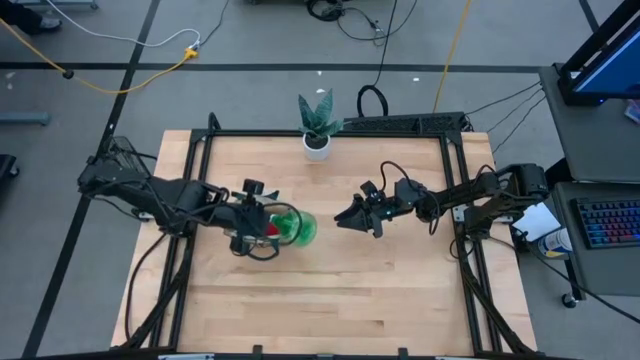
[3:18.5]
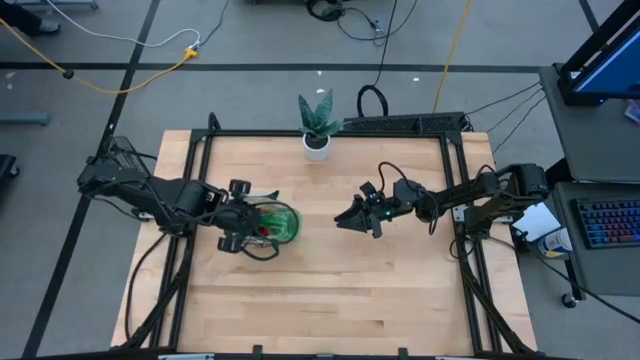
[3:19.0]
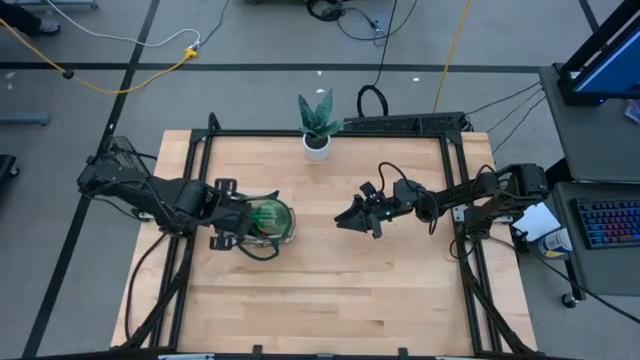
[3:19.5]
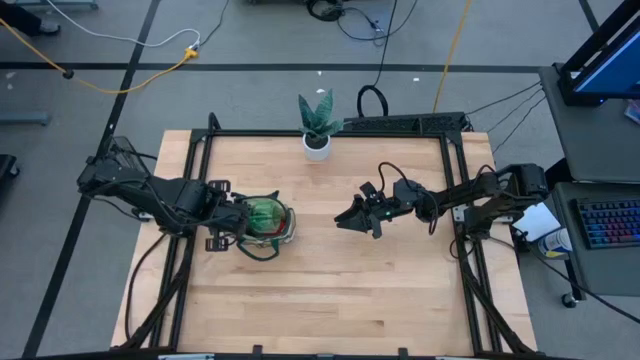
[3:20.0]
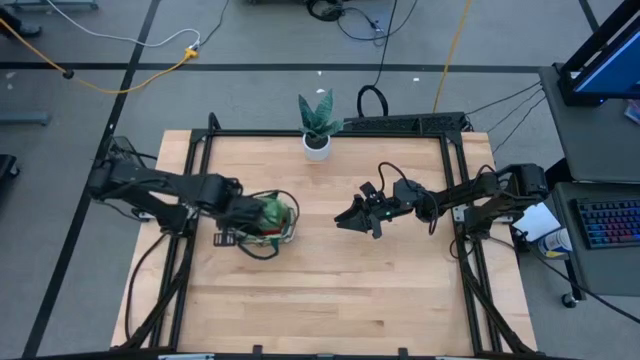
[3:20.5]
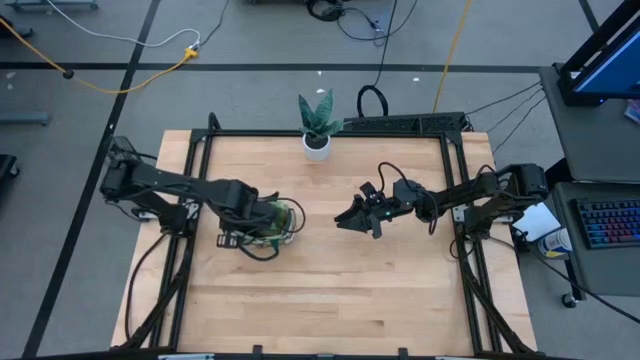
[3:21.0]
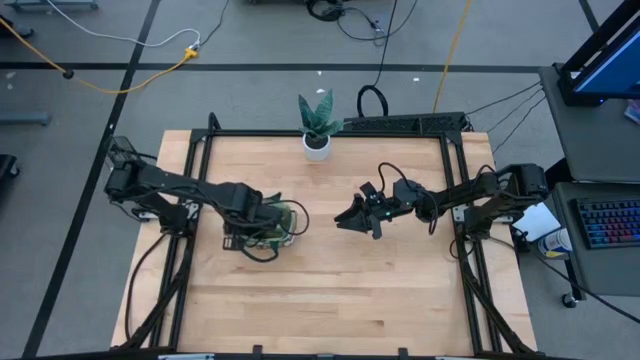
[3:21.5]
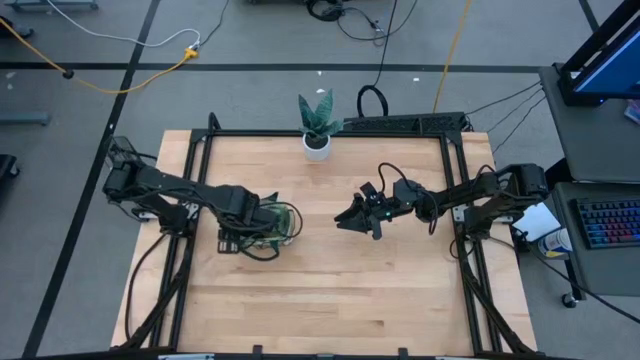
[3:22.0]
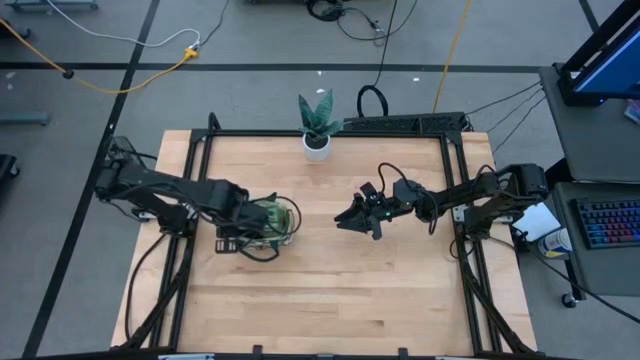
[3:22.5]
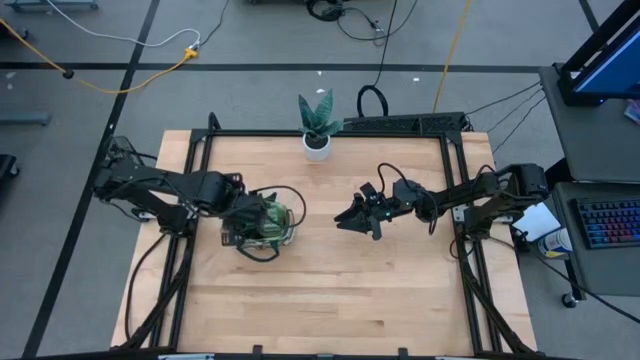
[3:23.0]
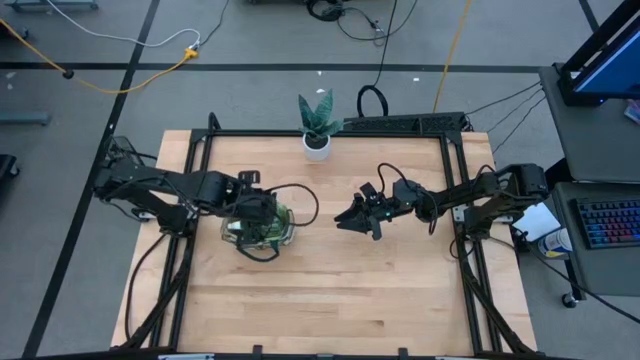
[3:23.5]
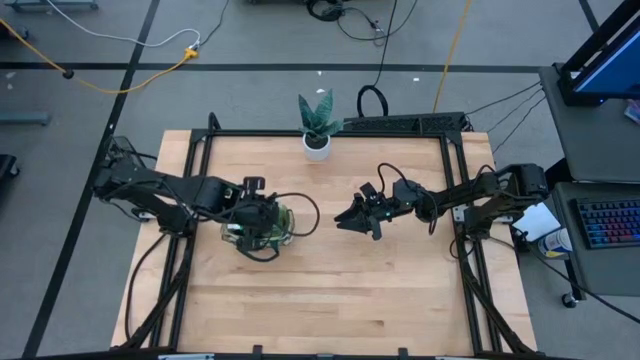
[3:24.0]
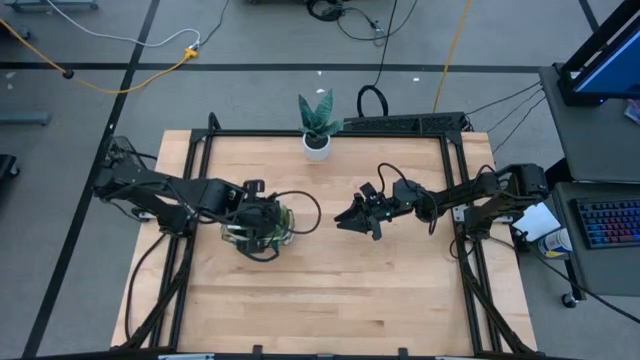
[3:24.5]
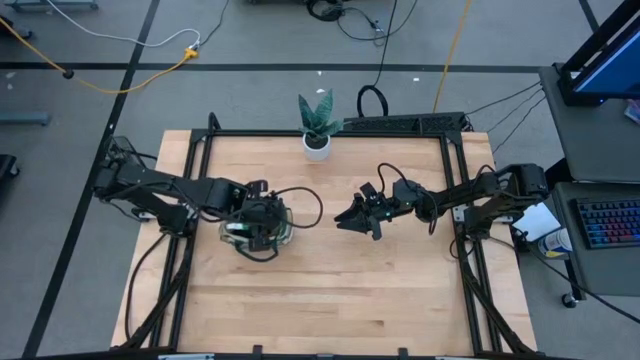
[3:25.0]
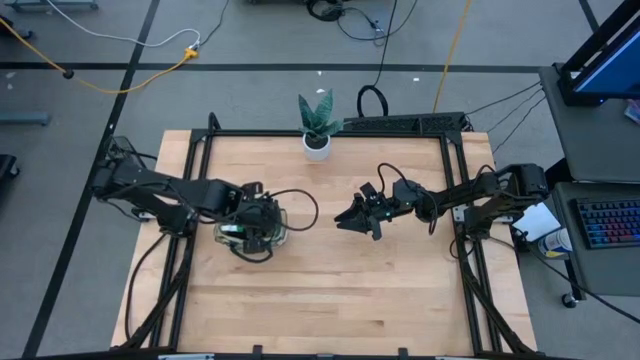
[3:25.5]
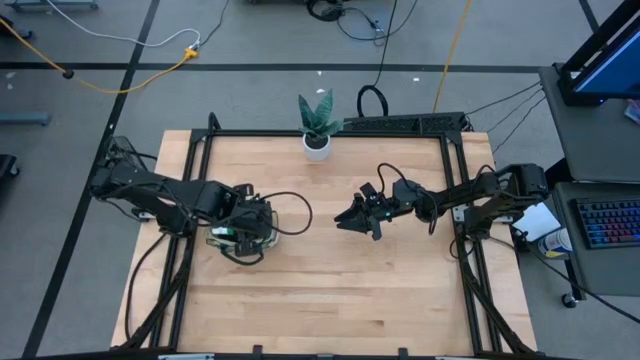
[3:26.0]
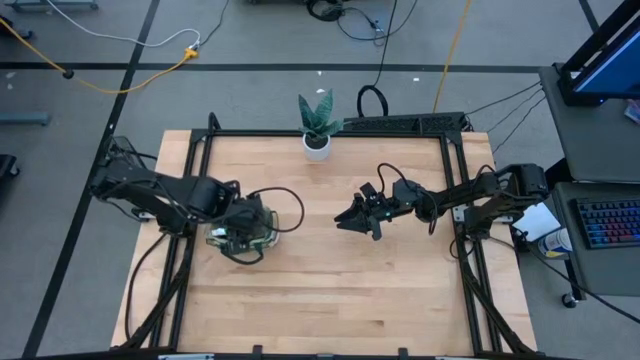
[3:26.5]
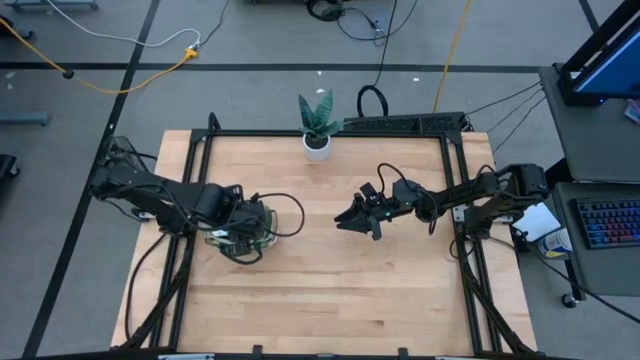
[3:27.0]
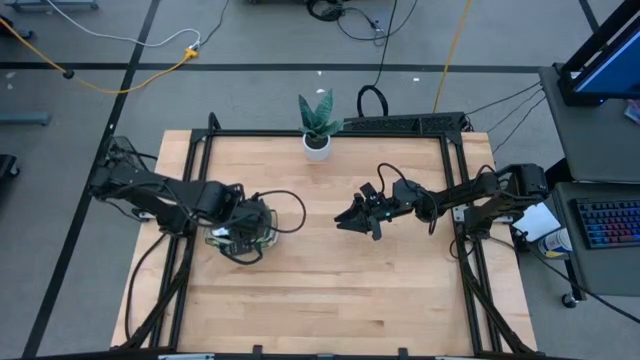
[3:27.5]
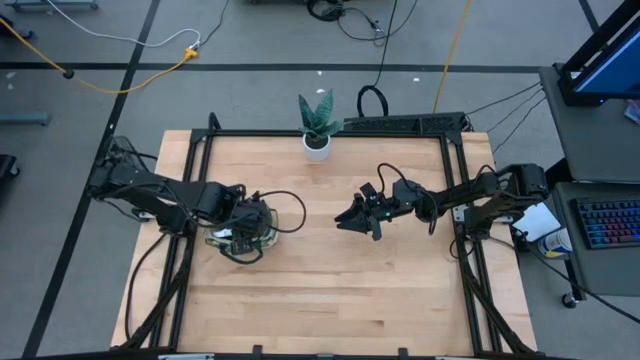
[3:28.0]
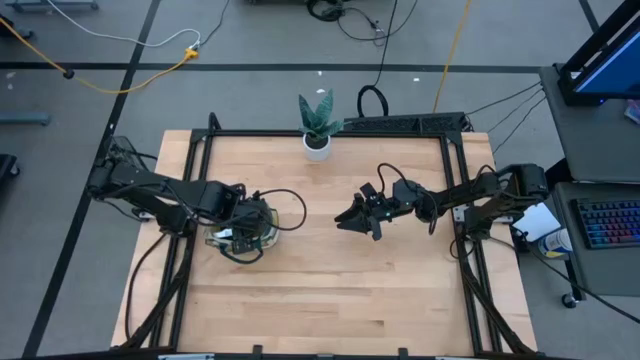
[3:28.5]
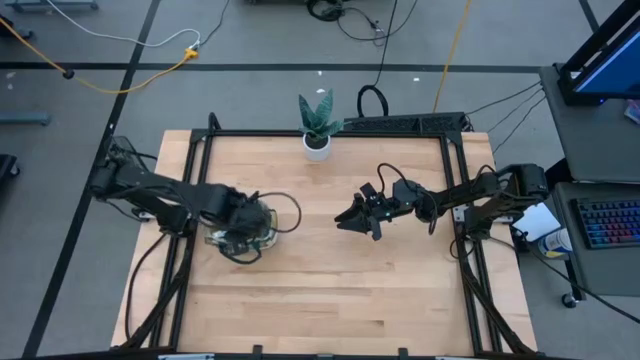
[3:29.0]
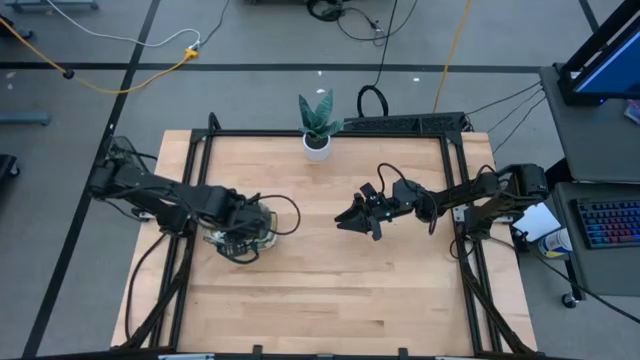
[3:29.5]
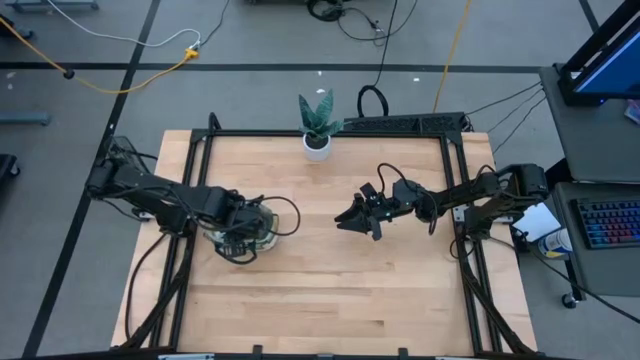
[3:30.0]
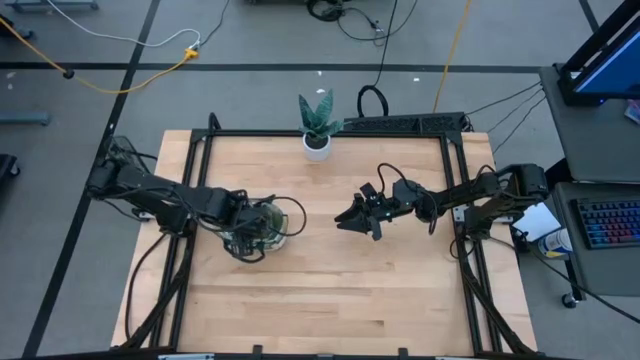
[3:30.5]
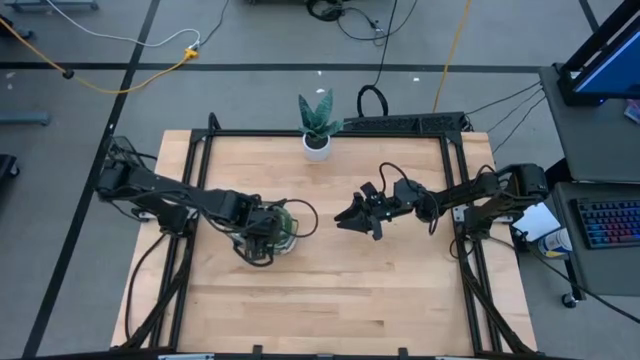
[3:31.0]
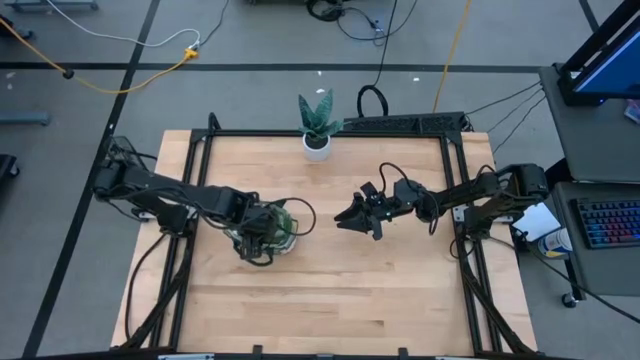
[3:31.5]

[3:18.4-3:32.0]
Task: Pick & Place Garden tools in Gardening bag
Put the green spray bottle into the white gardening bag

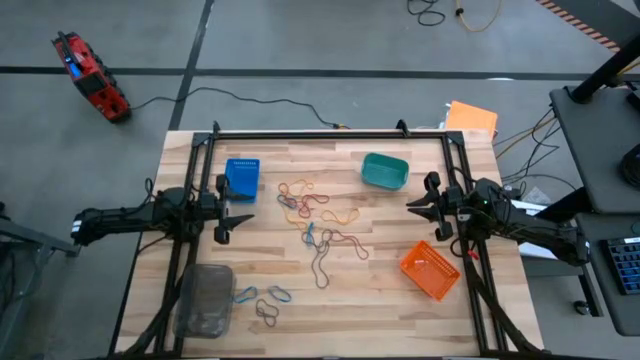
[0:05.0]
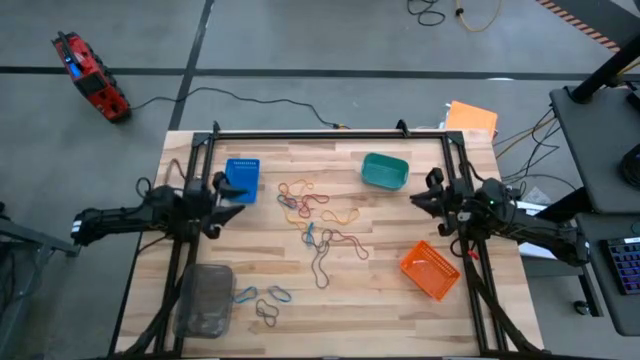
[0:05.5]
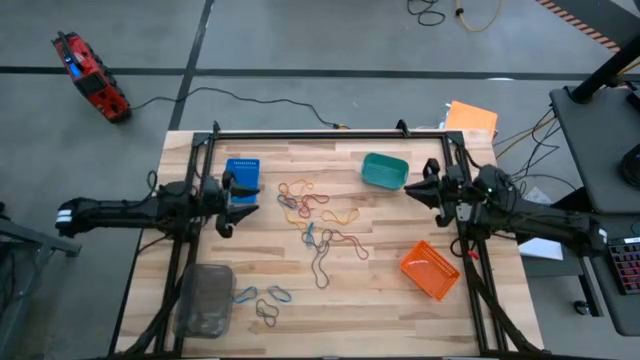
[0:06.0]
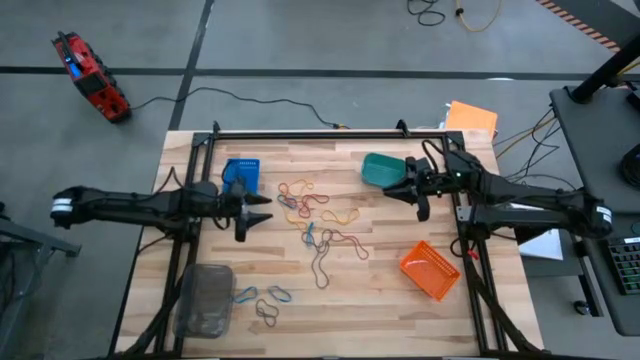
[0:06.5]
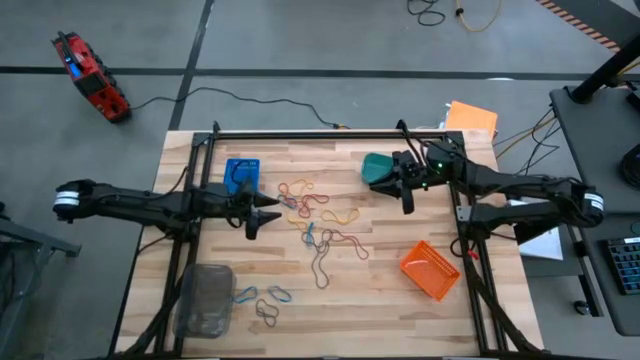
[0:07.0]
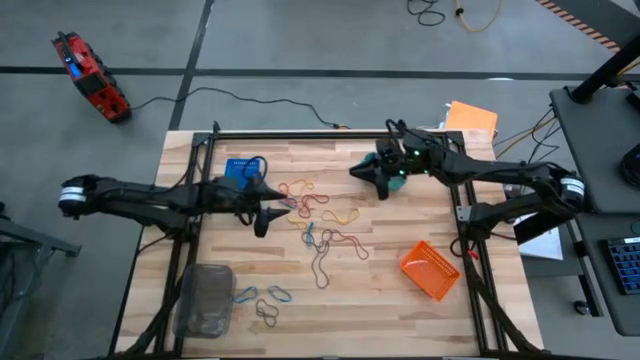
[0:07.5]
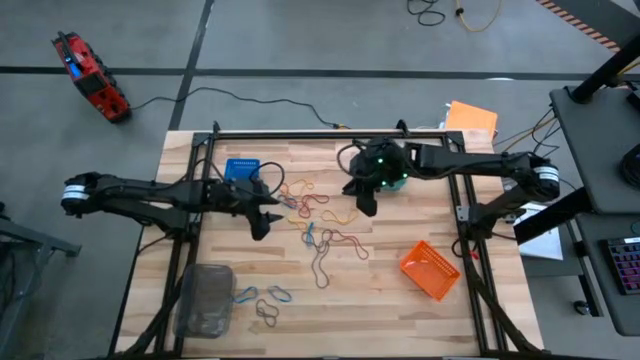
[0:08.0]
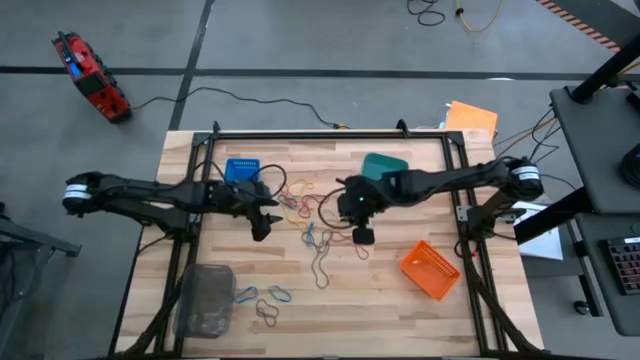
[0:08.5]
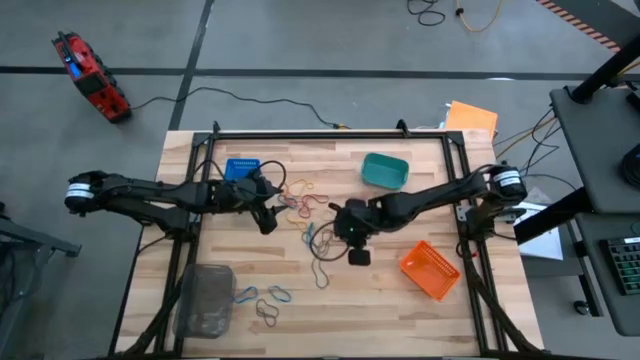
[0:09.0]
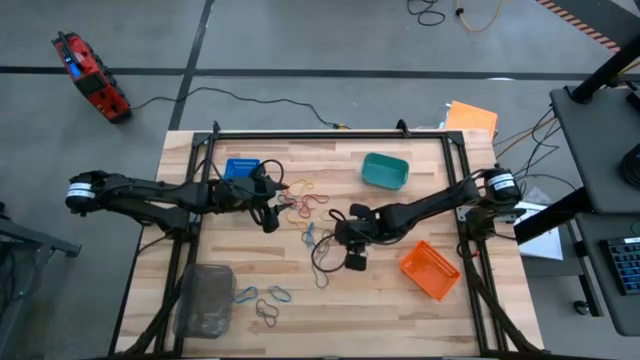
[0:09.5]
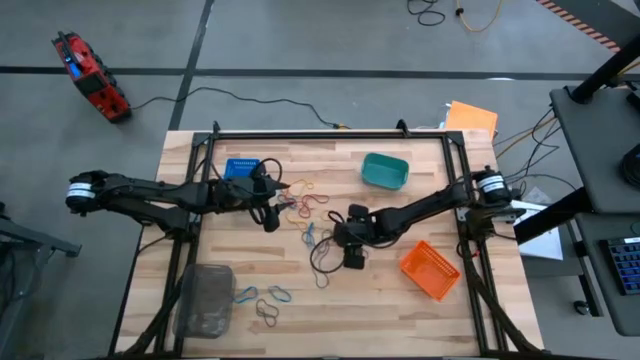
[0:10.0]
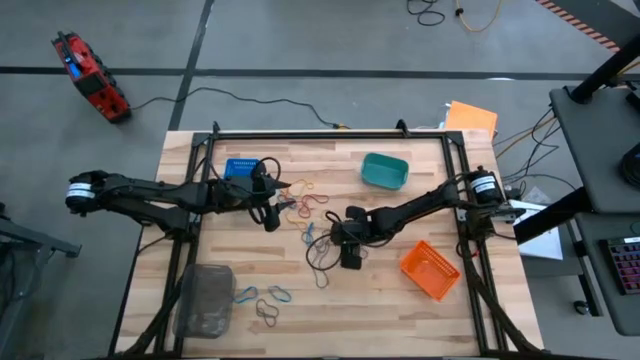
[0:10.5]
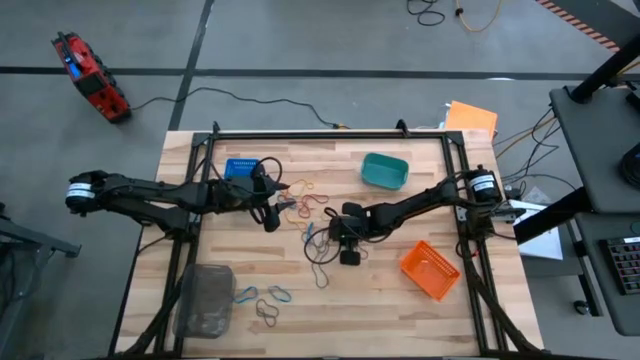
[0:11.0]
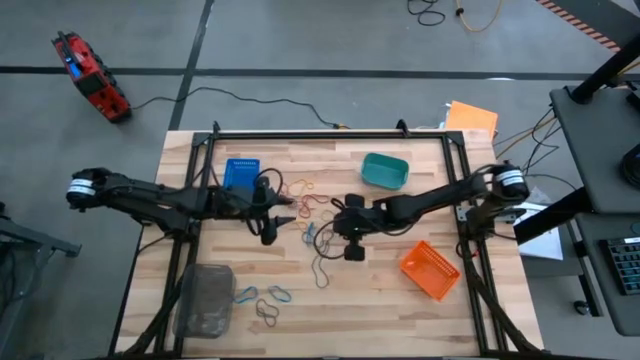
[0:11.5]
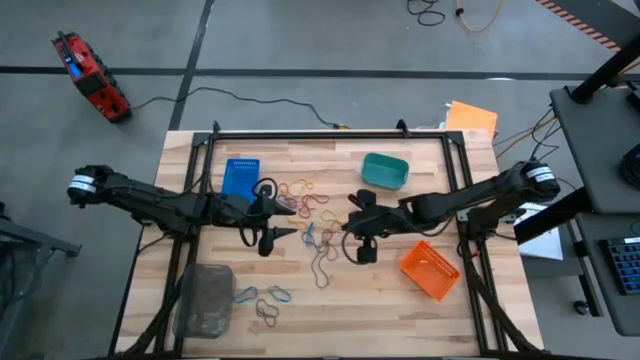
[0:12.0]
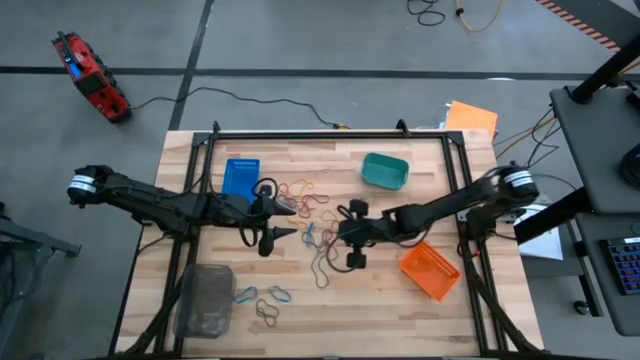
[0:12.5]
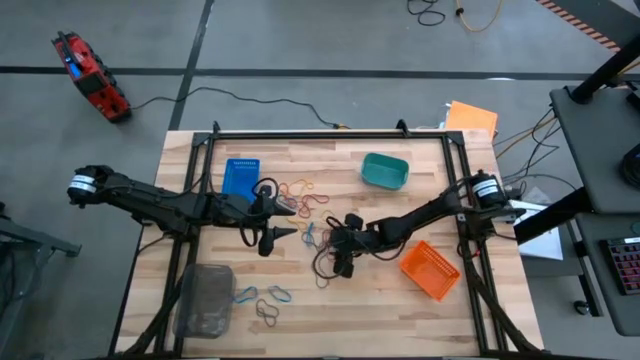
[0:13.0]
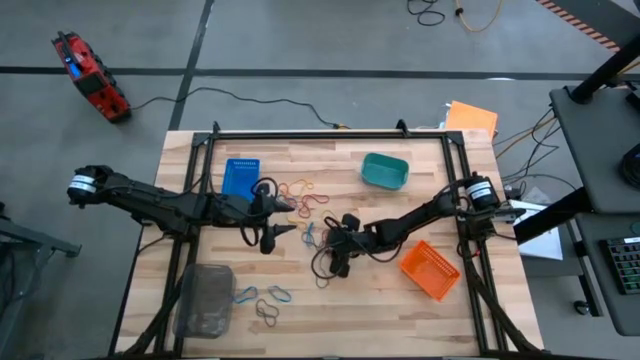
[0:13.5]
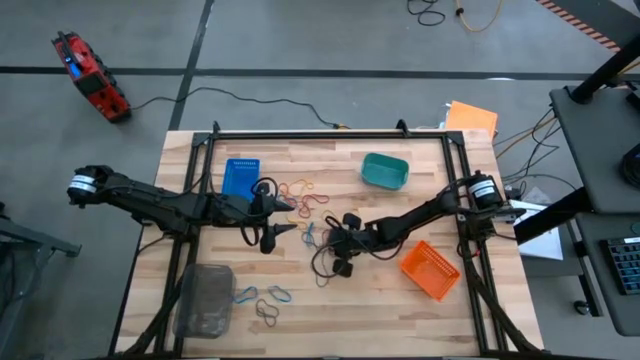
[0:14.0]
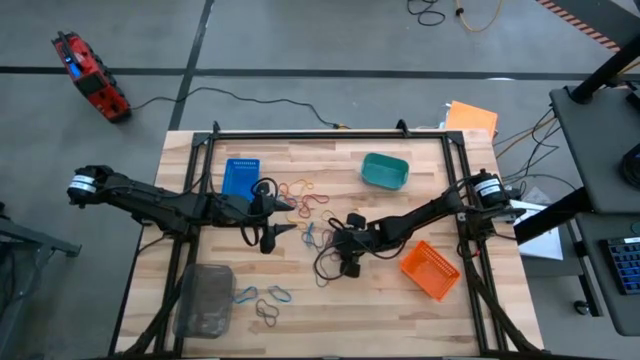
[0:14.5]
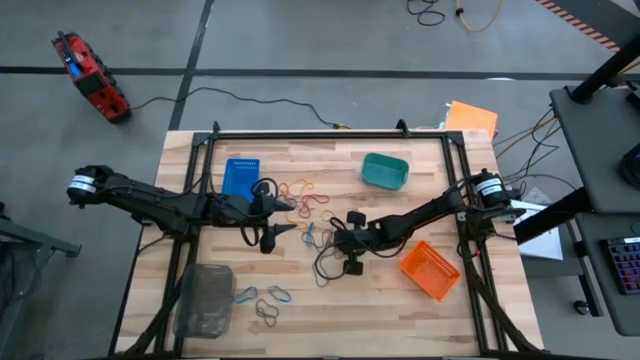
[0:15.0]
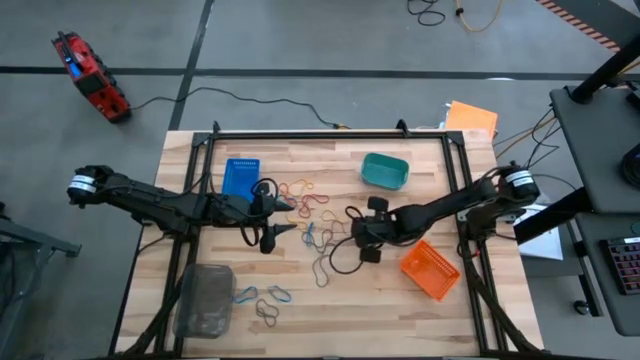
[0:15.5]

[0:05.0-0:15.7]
Task: Sort rubber bands into baskets
Put the red rubberband into the orange bin
